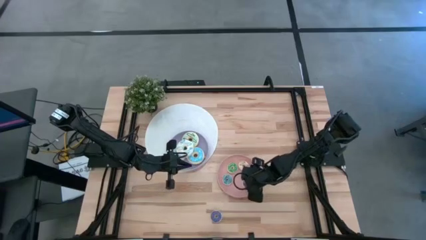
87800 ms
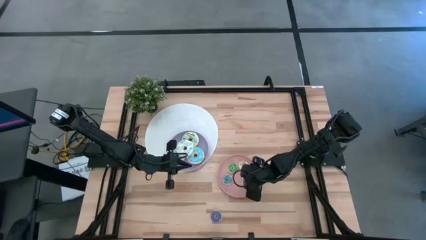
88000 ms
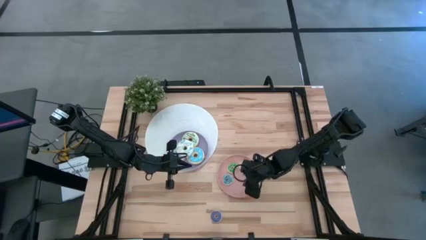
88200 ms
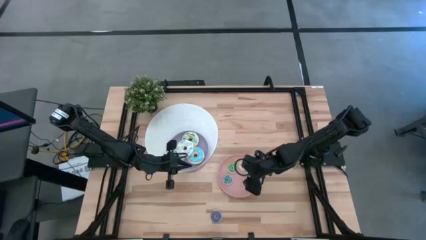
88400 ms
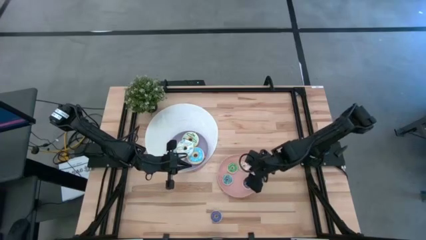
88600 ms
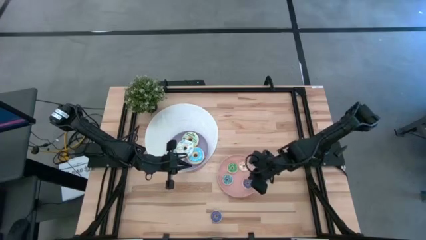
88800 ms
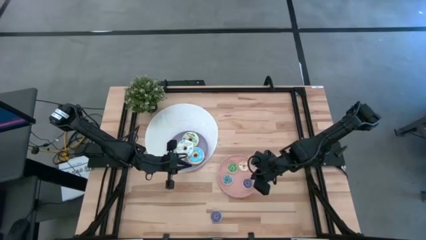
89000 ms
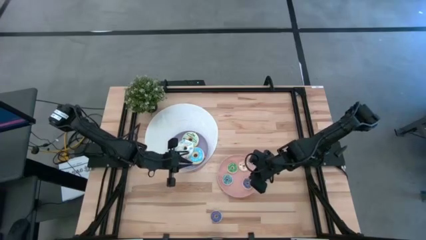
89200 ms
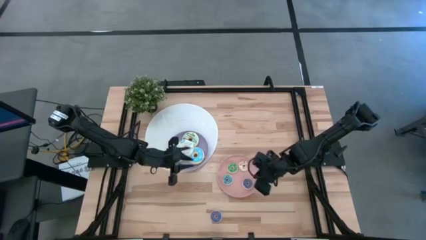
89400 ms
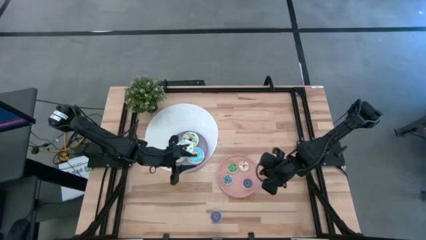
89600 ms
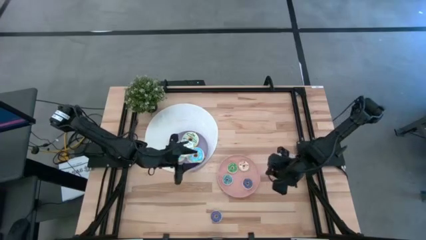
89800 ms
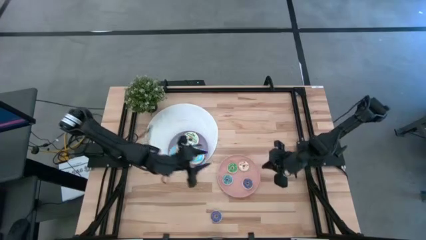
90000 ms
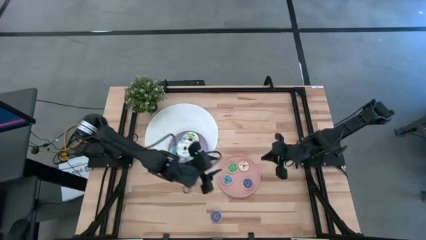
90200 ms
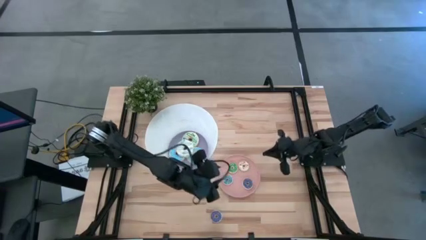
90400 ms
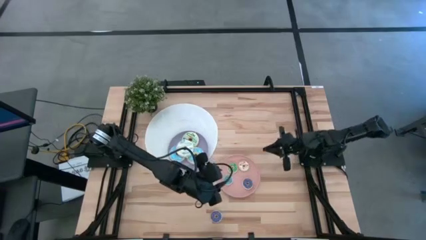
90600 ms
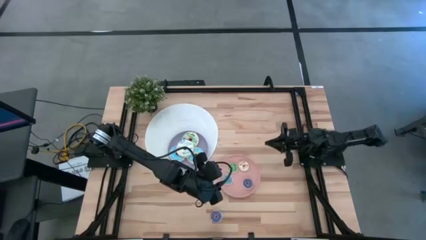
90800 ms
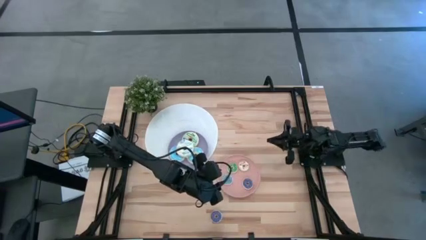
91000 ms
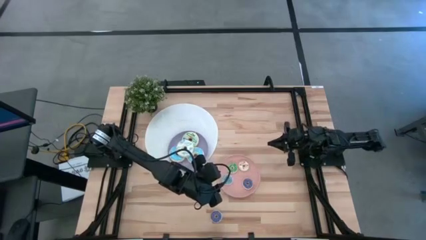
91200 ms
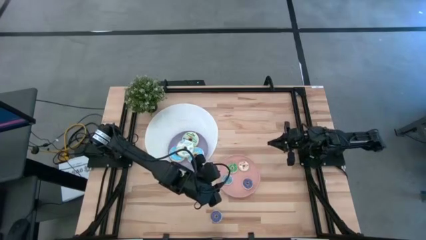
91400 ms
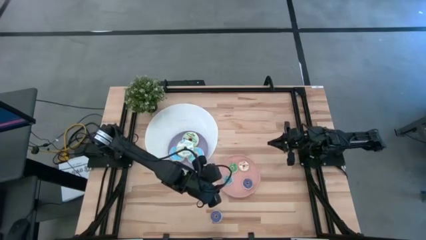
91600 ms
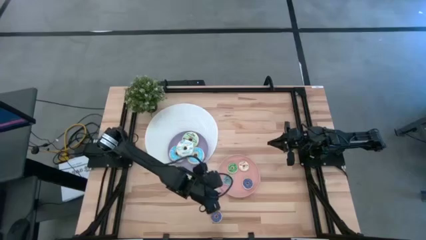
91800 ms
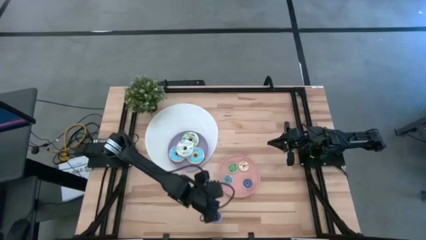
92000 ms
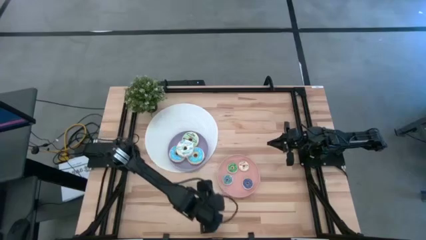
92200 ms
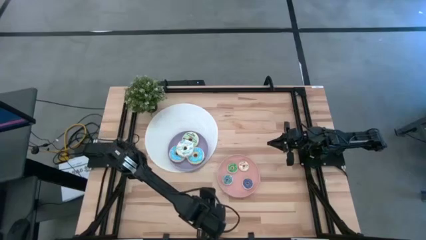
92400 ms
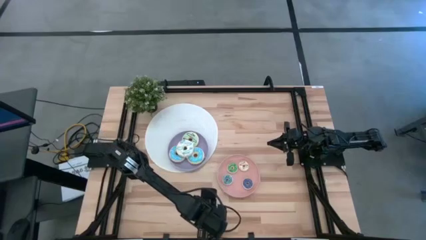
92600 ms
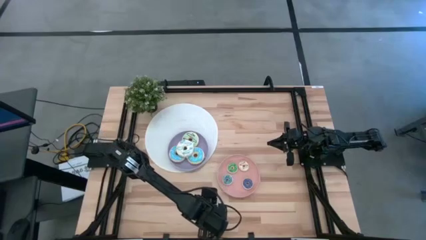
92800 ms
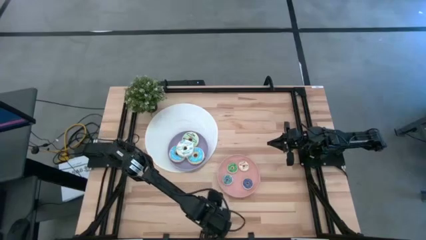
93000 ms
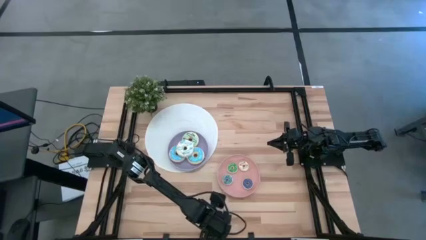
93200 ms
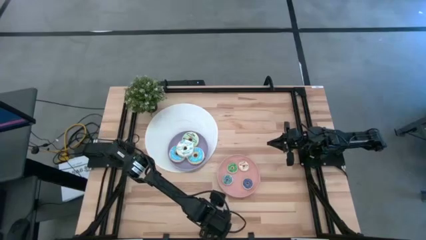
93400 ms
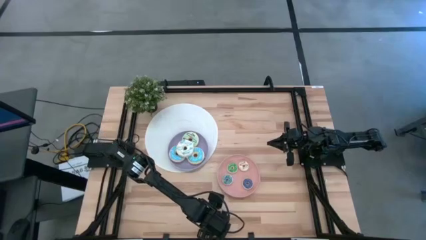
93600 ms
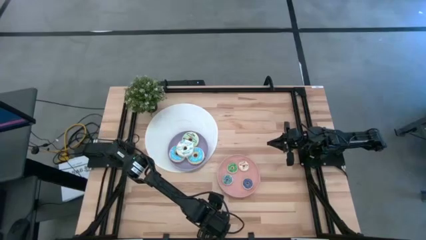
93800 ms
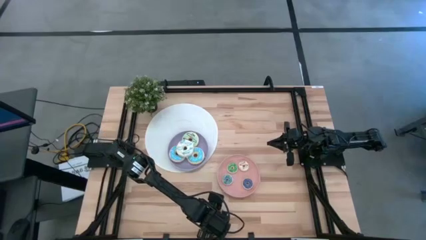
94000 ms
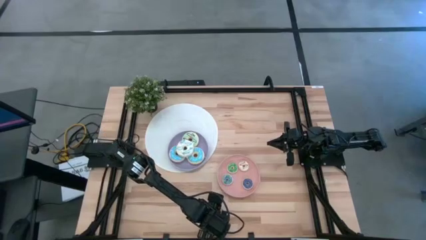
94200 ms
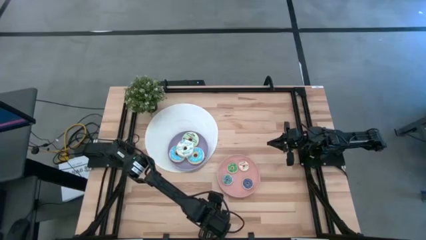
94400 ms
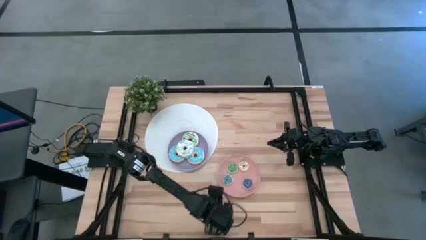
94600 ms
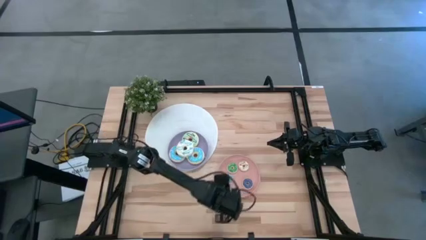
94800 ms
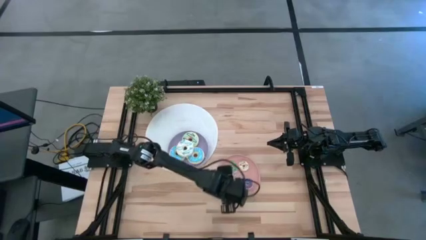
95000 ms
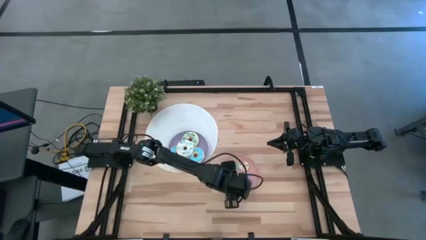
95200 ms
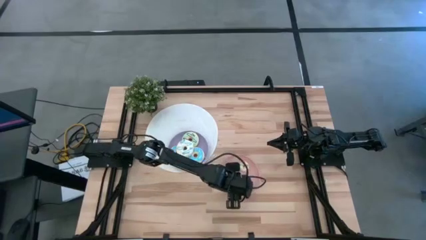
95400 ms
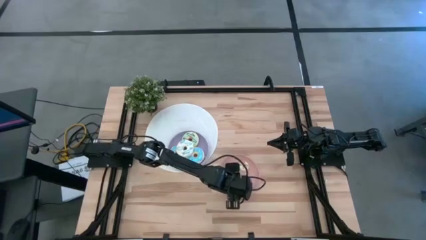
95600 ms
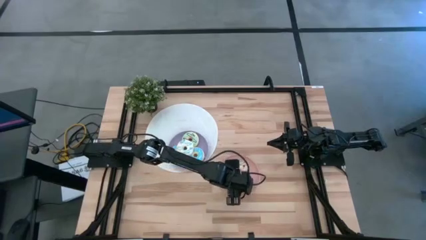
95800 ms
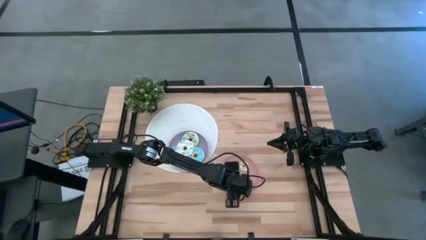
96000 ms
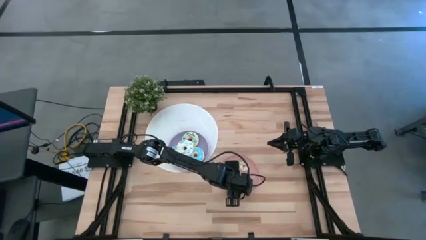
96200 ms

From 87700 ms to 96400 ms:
Task: Pick & Place donuts
Put the small violet donut on the pink plate

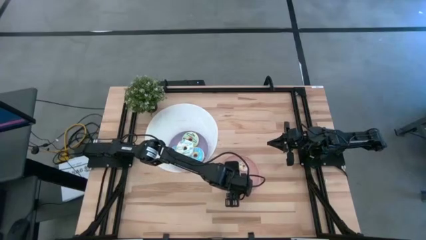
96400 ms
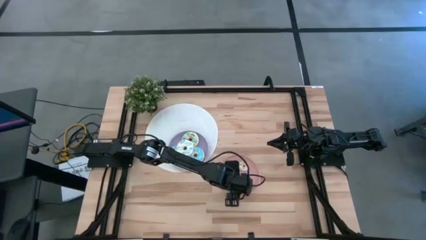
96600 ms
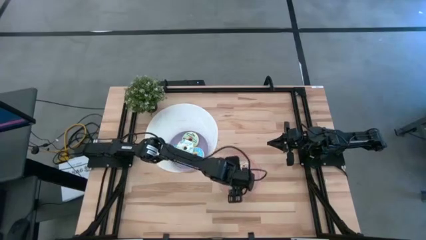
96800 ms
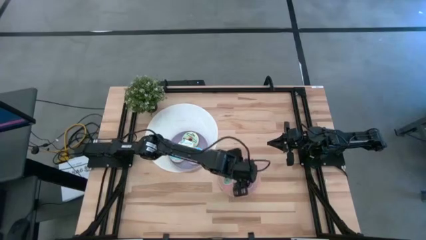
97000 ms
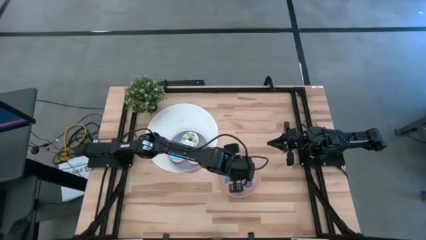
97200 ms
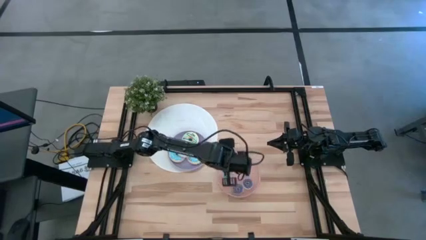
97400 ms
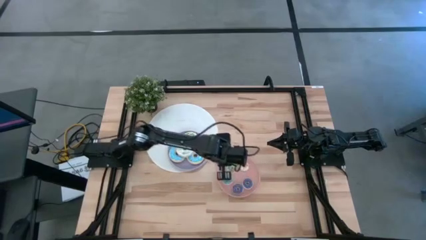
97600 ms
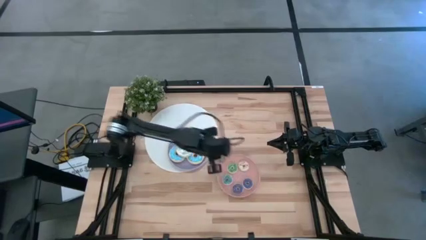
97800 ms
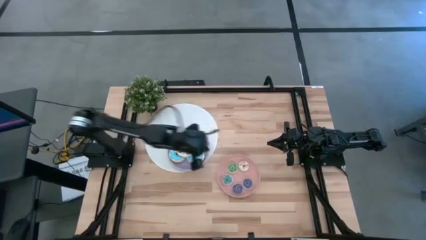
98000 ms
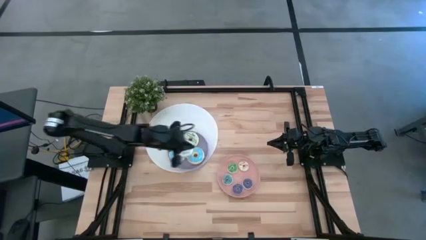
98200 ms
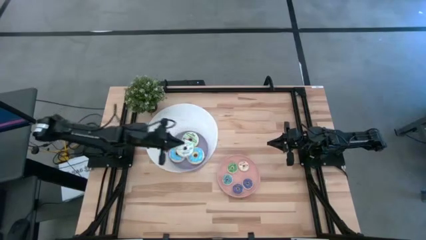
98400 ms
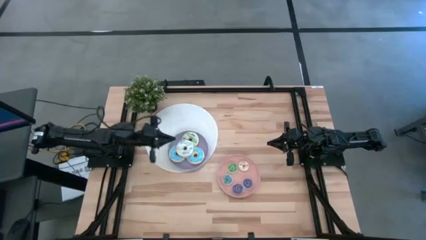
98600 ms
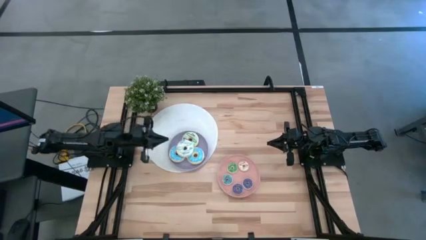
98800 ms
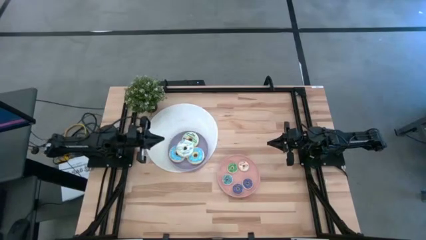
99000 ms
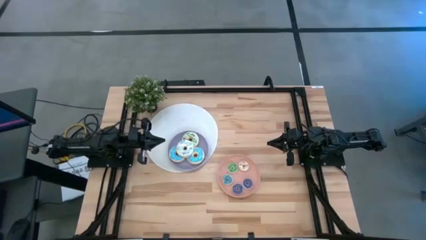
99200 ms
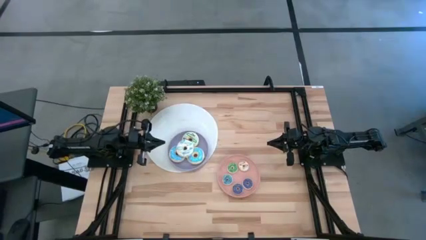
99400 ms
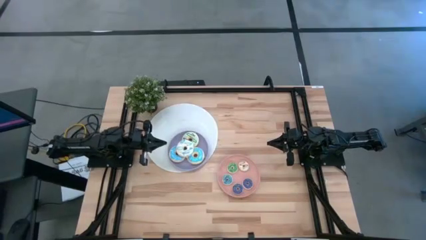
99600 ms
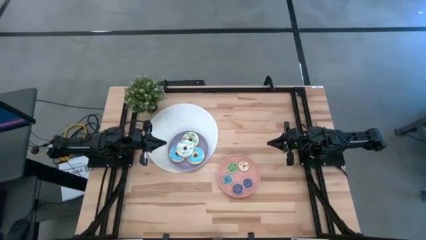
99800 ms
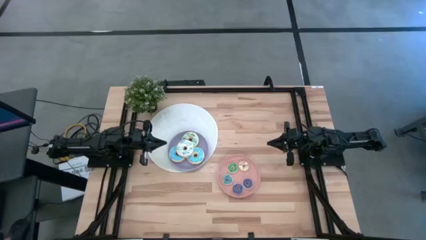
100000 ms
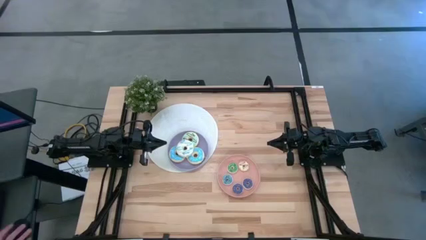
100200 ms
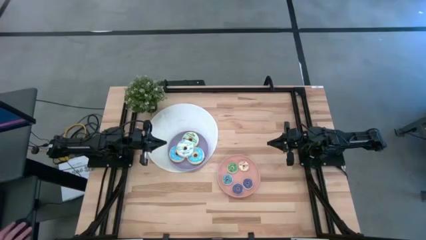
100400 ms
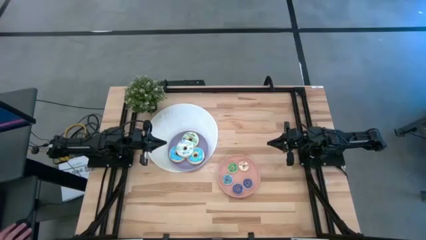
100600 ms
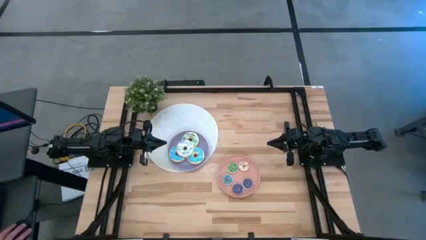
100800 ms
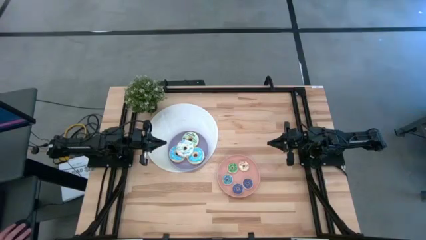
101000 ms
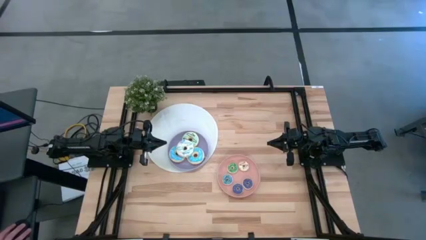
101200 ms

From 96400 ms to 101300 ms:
Return to Home Position

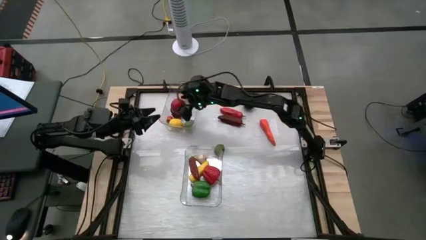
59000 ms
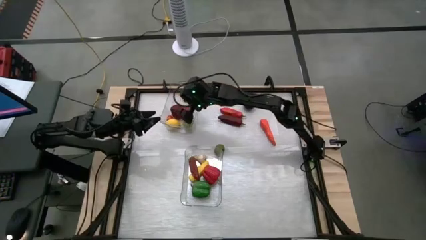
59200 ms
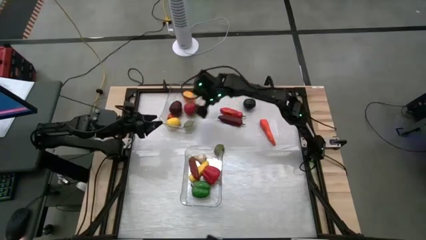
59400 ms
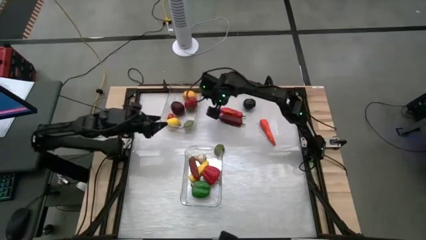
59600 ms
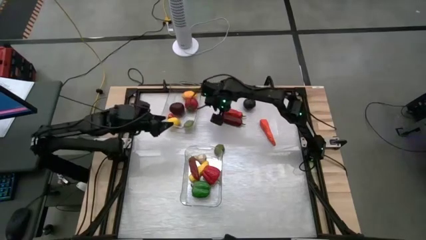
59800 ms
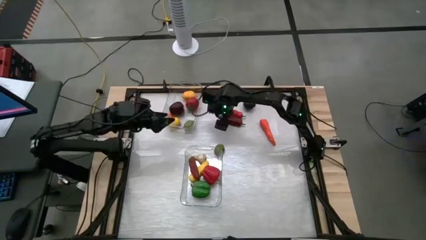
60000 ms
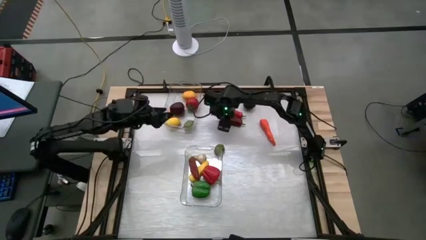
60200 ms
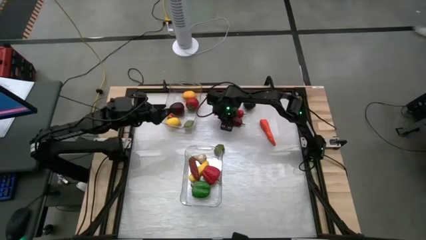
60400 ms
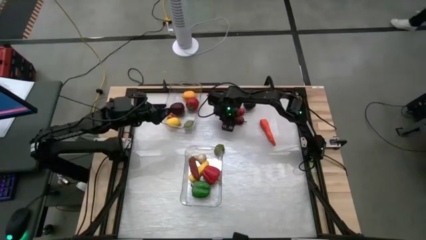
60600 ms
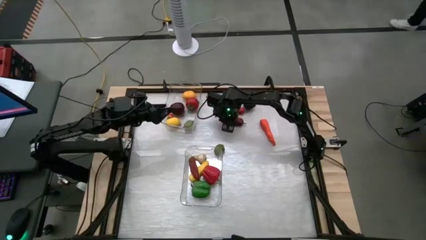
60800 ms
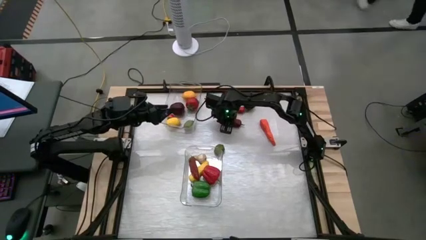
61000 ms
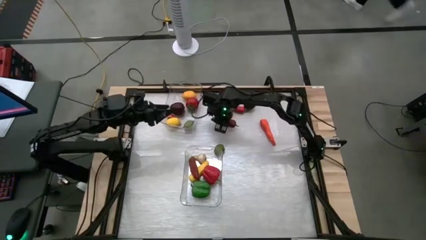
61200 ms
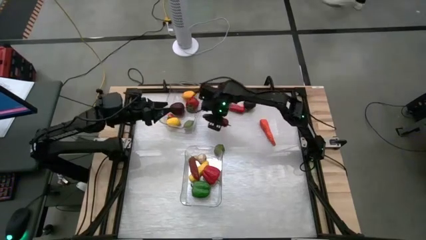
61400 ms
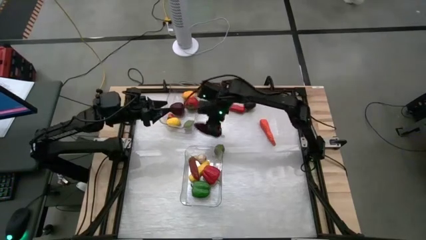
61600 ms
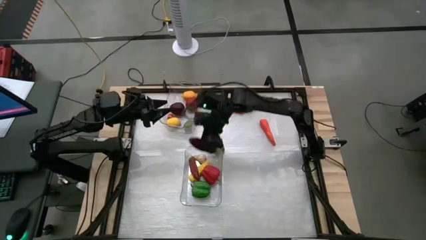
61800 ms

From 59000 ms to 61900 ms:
Task: Sort produce into baskets
Put the dark red chili pepper into the bottom transparent bin

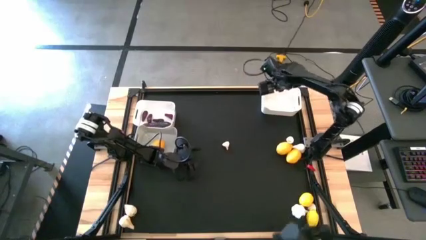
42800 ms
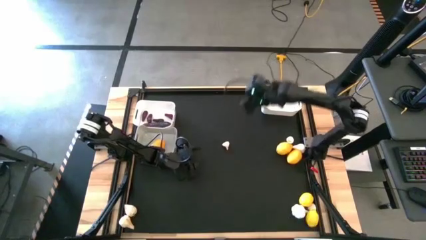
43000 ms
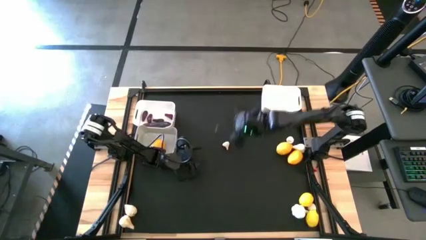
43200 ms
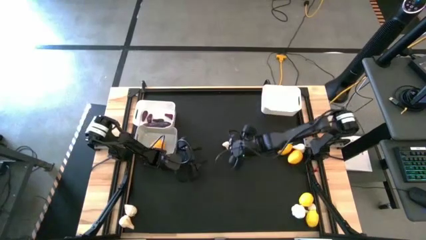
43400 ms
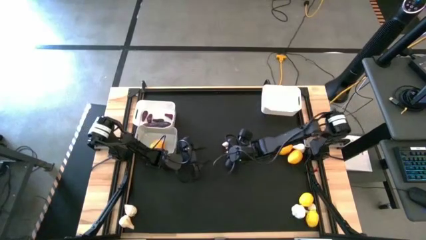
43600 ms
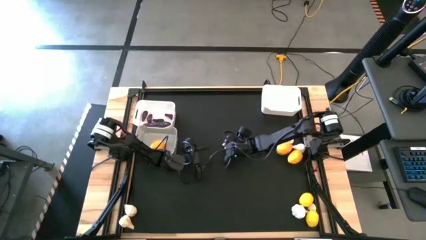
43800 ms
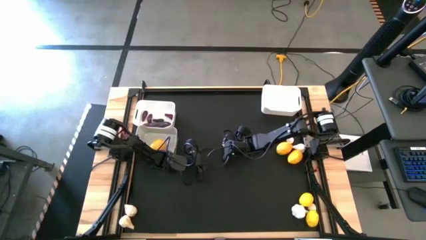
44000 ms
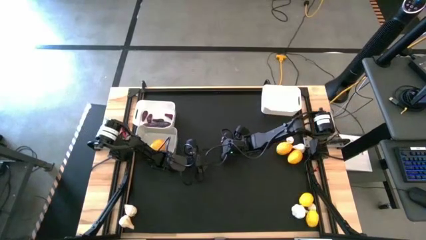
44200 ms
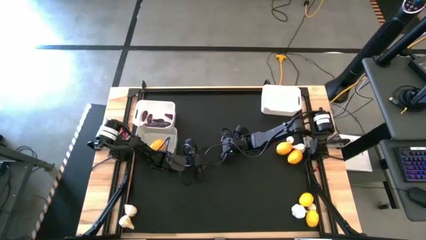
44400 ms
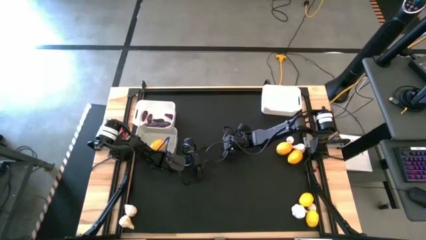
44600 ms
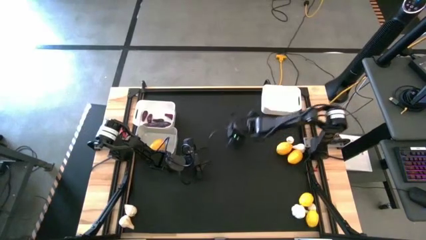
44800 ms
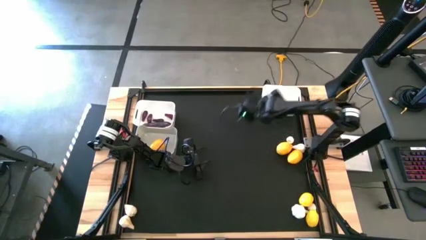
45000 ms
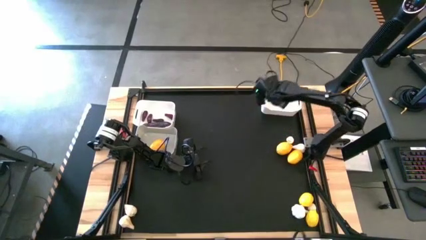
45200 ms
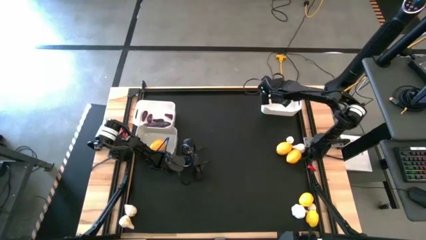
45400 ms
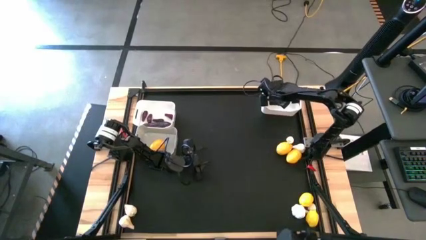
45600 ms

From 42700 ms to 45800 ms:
Task: Sort produce into baskets
Put the garlic into the right white bin
